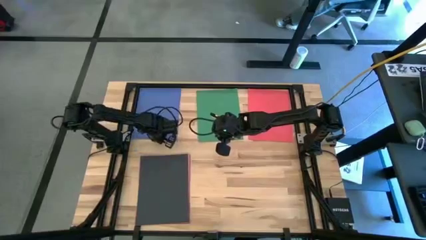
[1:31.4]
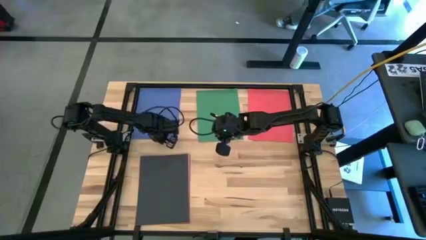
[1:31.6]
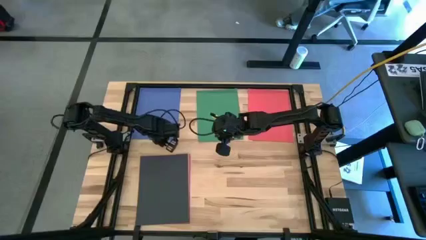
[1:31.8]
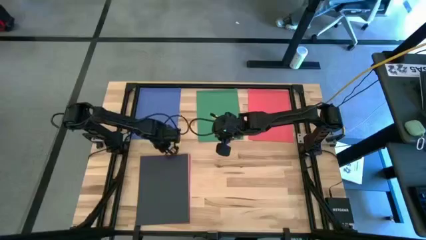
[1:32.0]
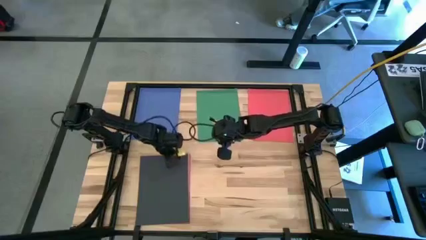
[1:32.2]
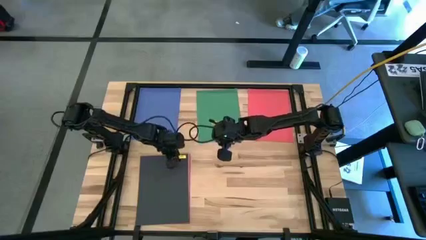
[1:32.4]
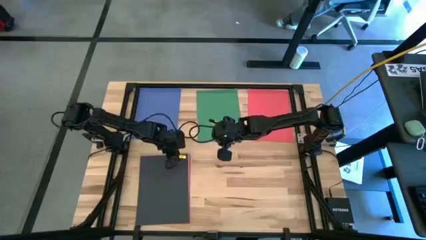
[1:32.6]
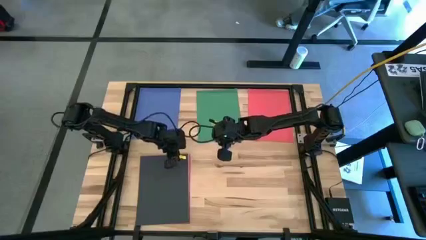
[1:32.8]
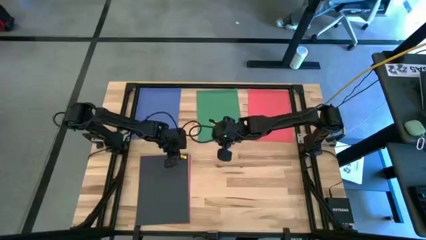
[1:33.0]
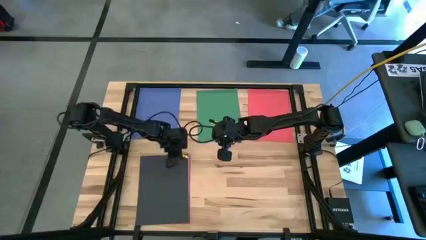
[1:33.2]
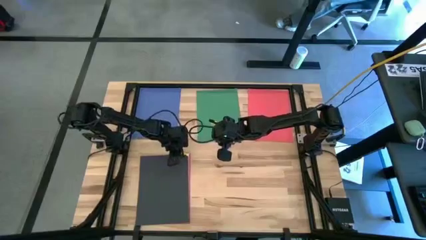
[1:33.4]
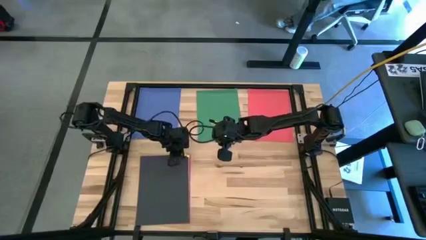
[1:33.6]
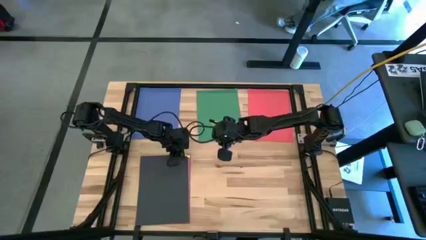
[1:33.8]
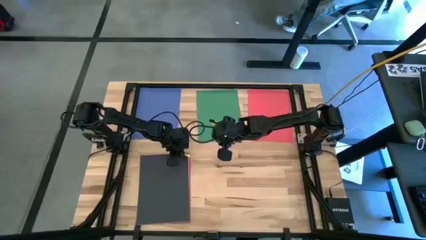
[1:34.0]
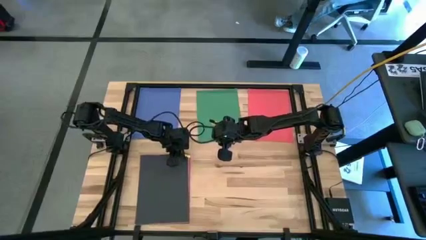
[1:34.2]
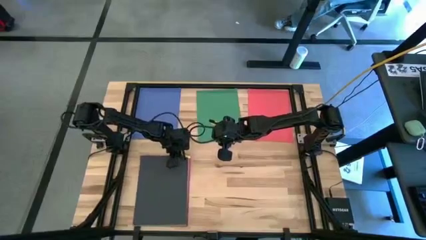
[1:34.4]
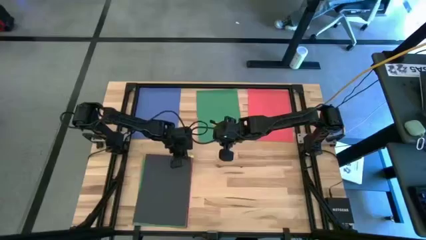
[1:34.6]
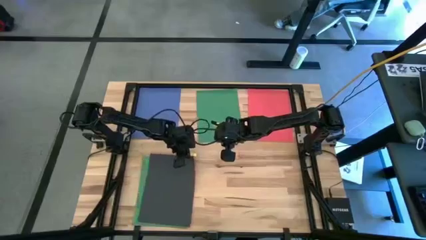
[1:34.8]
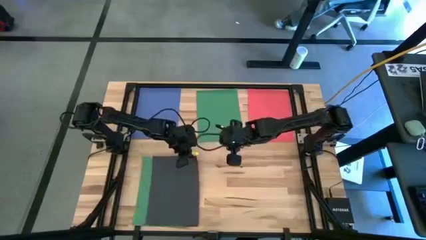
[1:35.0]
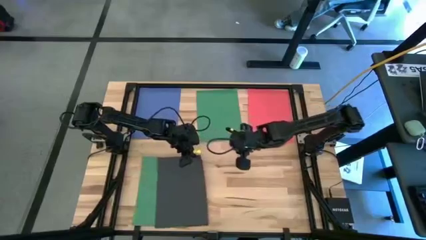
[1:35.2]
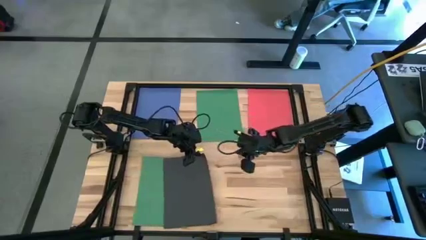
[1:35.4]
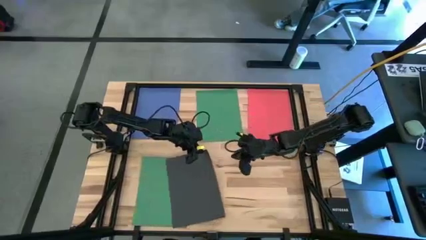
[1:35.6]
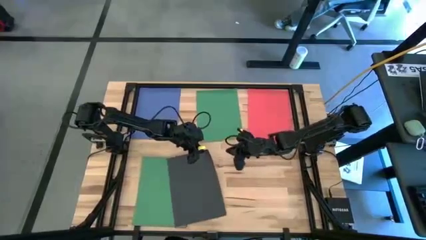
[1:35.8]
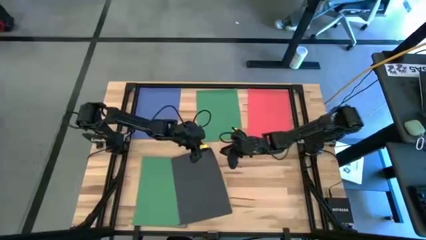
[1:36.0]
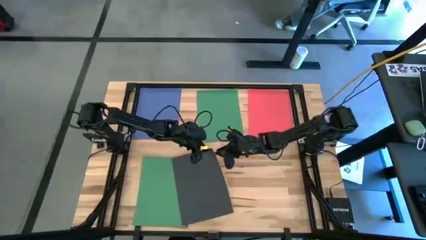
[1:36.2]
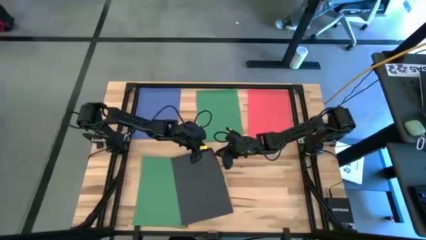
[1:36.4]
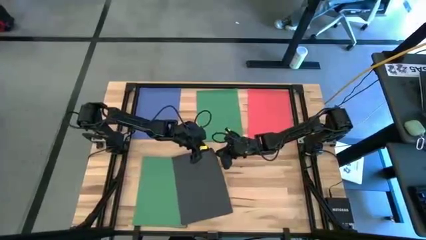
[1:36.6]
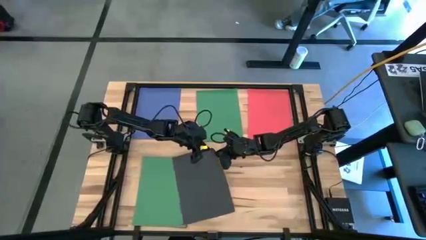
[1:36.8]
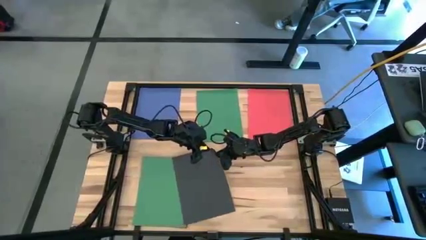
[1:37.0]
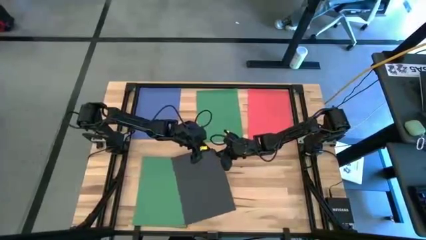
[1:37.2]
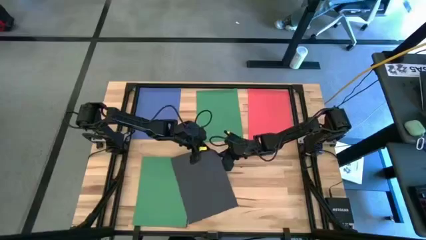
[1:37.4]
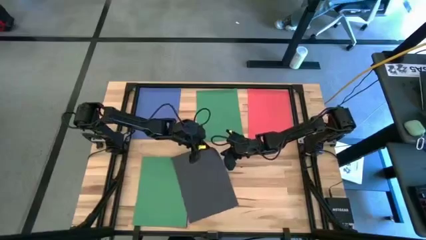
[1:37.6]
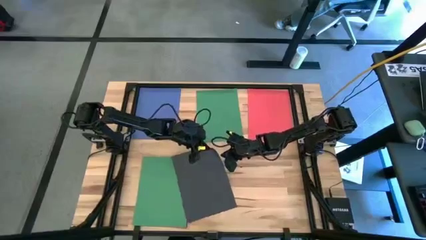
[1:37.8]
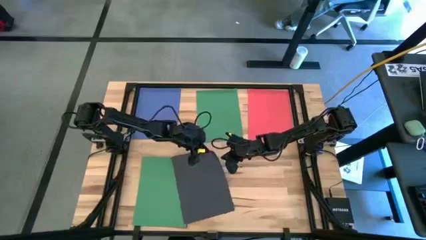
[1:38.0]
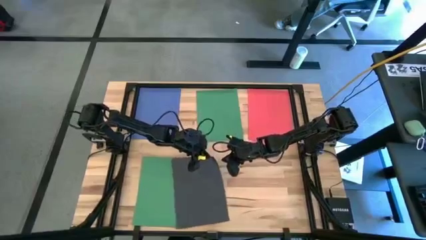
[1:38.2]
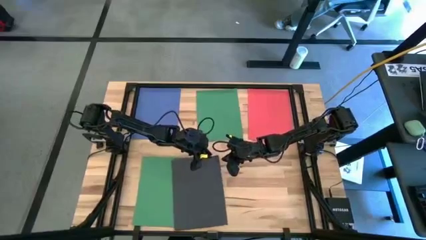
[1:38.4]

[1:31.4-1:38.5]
Task: Organize paper
Move the black paper to the bottom right of the table

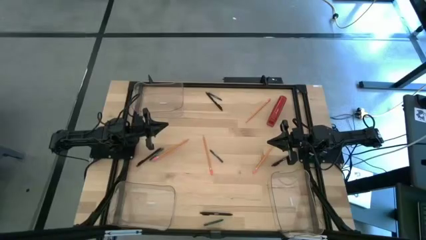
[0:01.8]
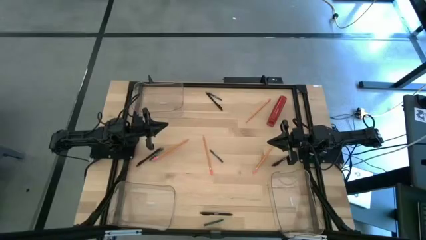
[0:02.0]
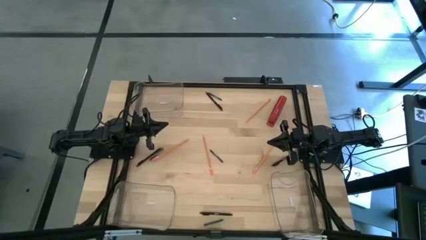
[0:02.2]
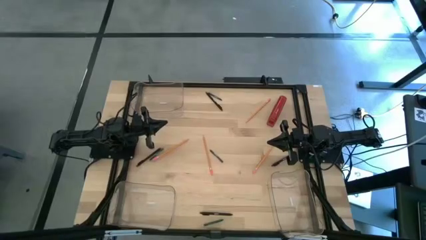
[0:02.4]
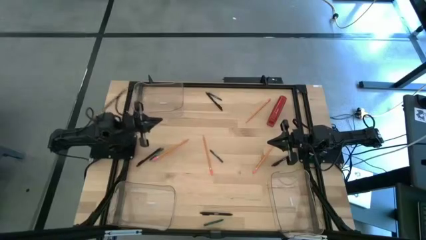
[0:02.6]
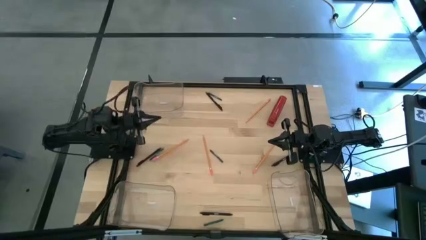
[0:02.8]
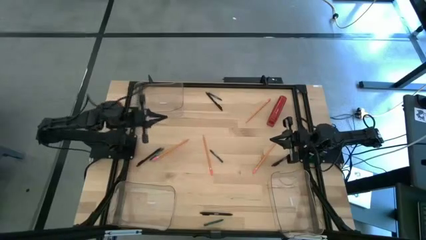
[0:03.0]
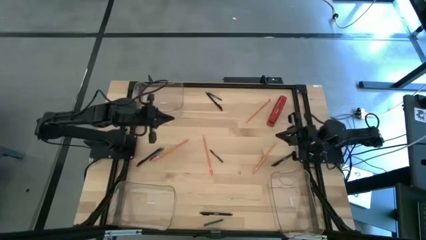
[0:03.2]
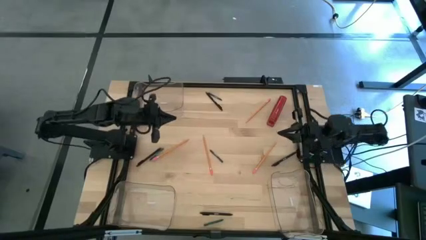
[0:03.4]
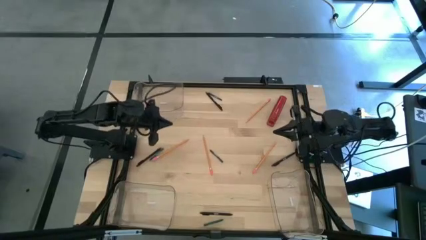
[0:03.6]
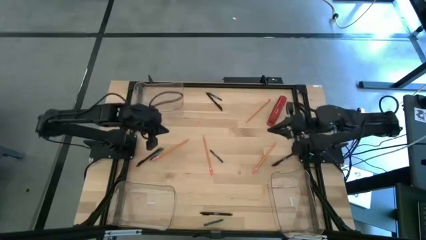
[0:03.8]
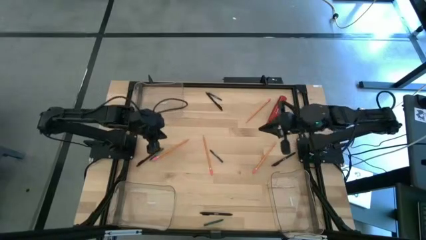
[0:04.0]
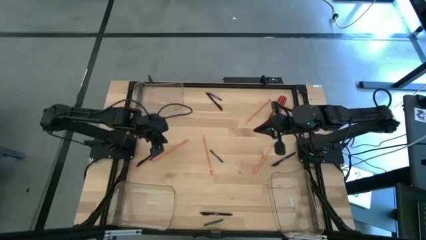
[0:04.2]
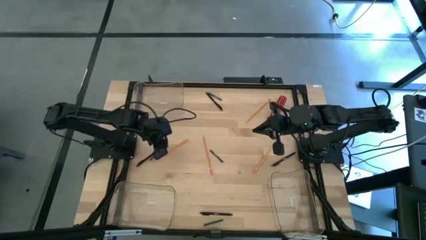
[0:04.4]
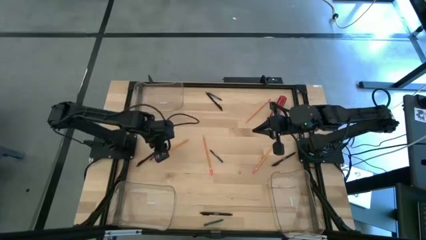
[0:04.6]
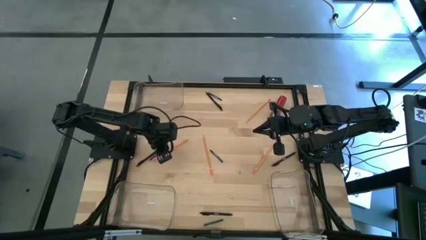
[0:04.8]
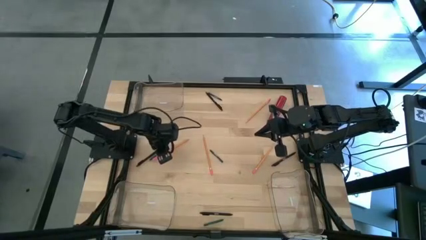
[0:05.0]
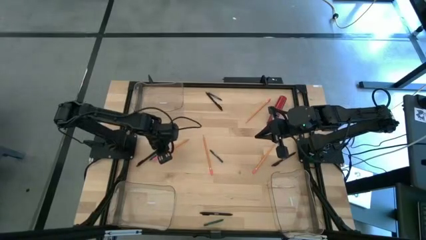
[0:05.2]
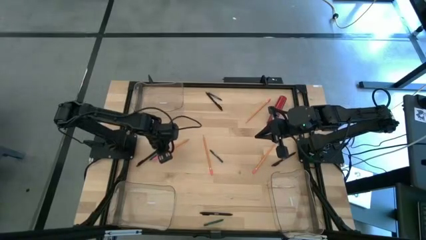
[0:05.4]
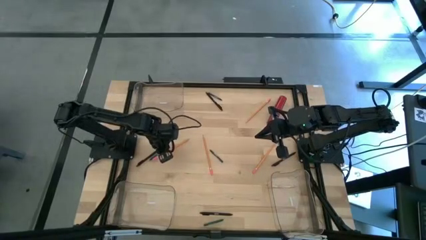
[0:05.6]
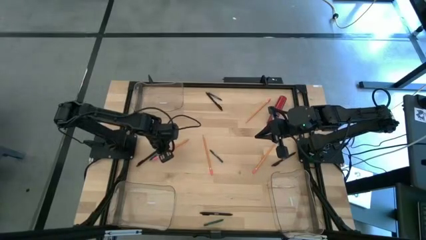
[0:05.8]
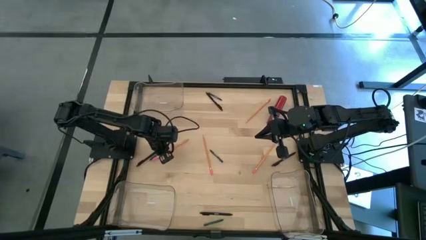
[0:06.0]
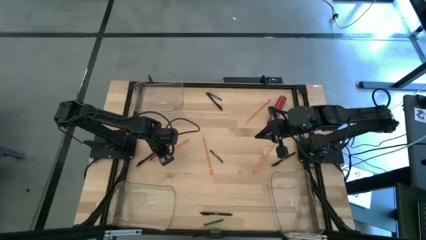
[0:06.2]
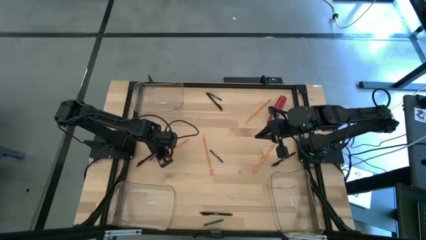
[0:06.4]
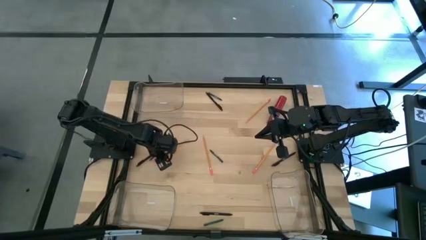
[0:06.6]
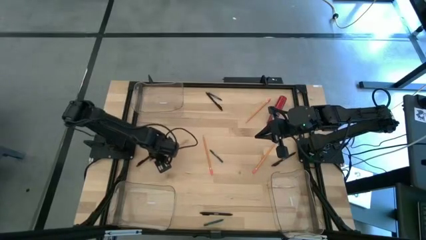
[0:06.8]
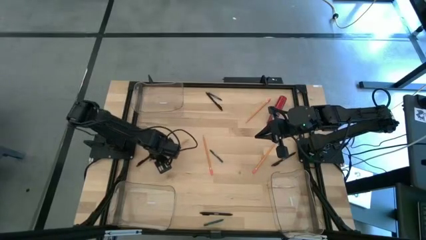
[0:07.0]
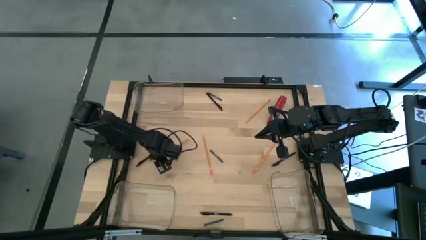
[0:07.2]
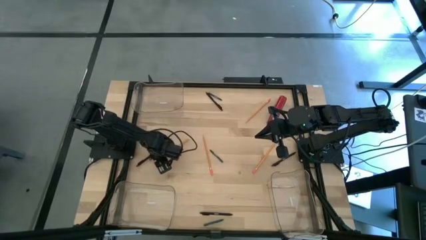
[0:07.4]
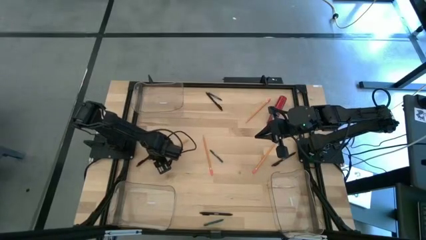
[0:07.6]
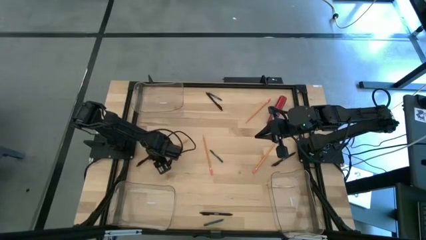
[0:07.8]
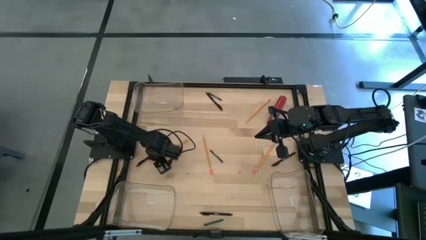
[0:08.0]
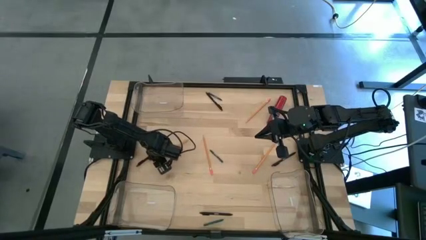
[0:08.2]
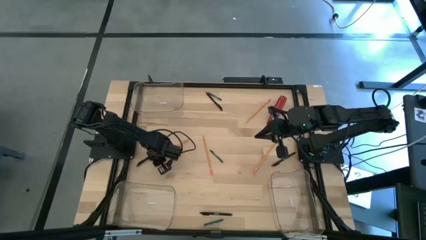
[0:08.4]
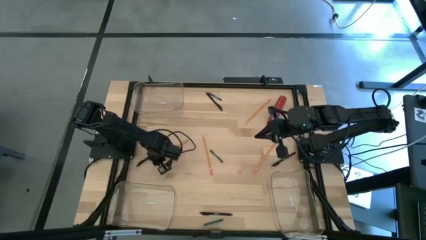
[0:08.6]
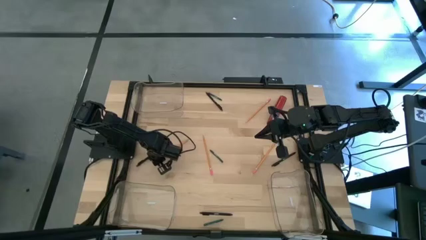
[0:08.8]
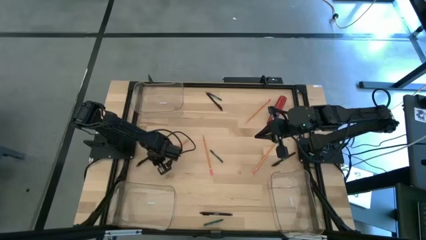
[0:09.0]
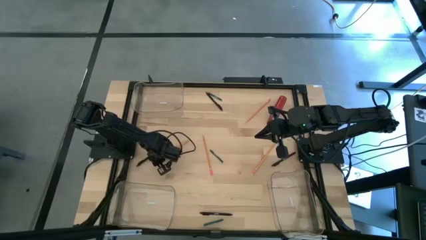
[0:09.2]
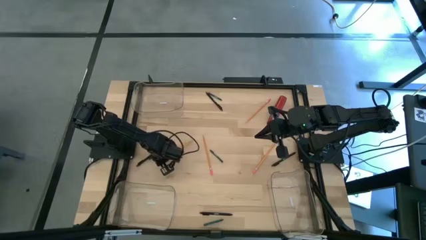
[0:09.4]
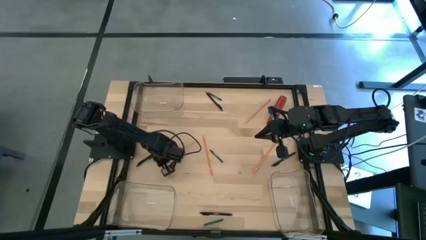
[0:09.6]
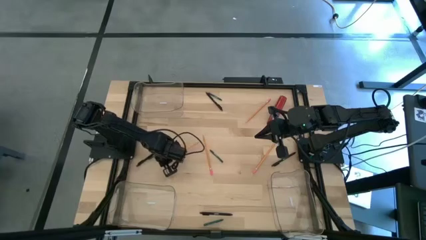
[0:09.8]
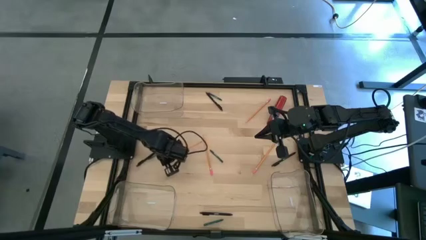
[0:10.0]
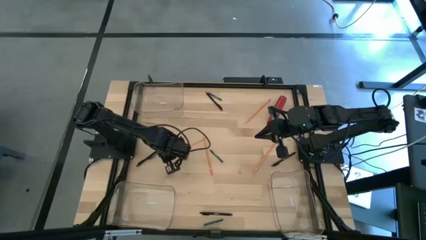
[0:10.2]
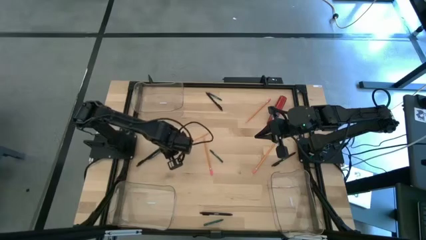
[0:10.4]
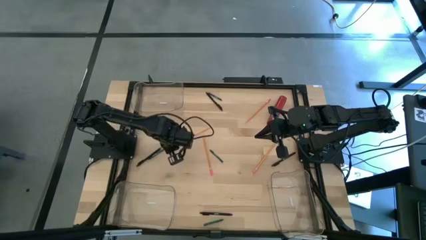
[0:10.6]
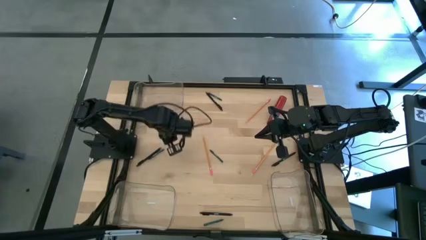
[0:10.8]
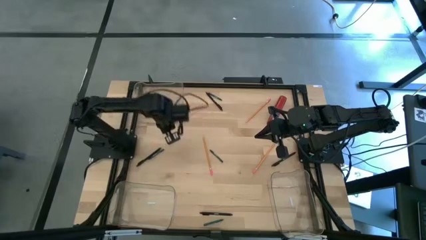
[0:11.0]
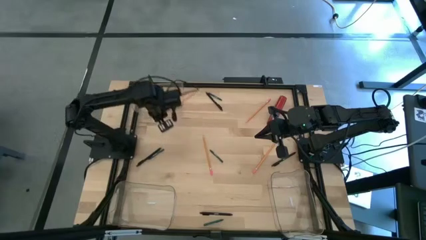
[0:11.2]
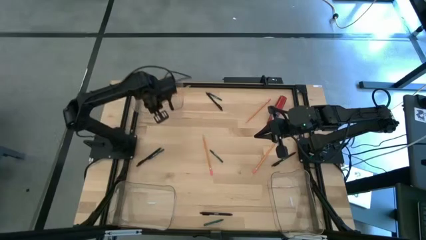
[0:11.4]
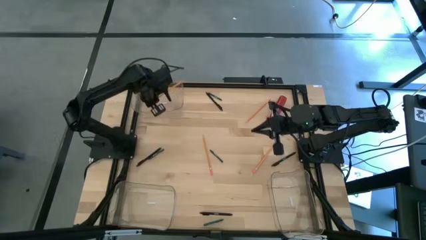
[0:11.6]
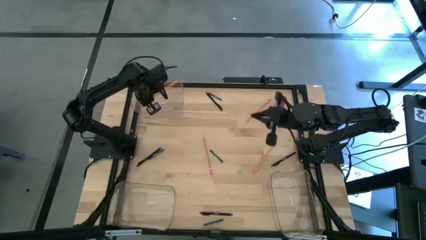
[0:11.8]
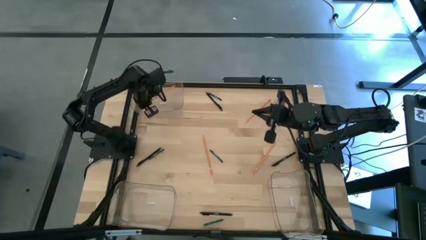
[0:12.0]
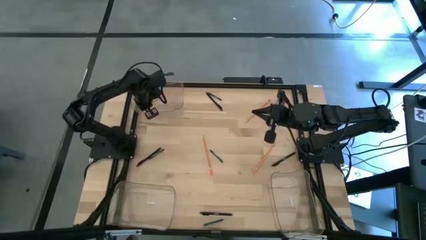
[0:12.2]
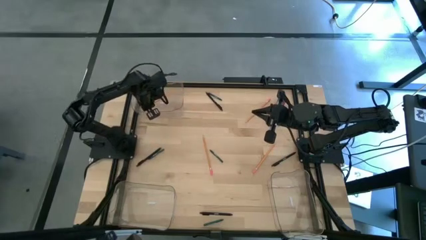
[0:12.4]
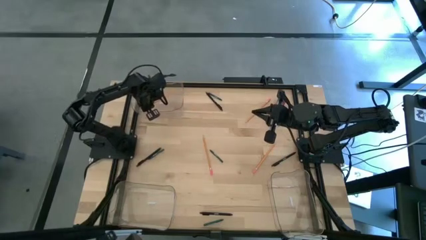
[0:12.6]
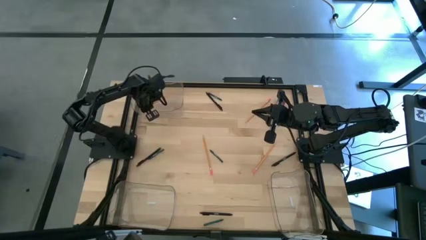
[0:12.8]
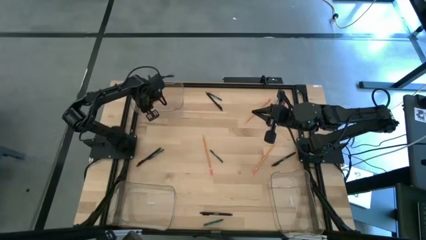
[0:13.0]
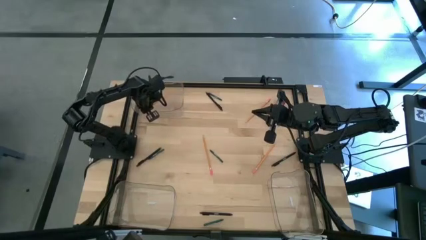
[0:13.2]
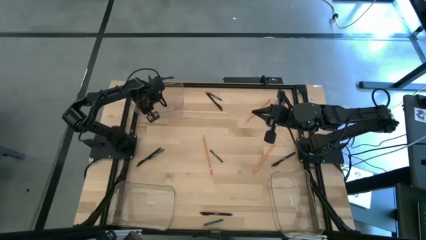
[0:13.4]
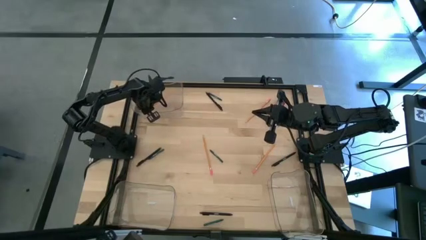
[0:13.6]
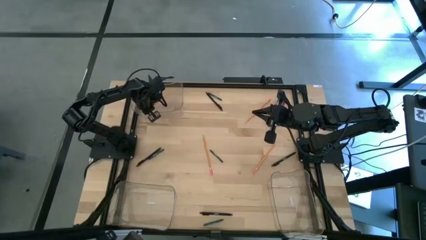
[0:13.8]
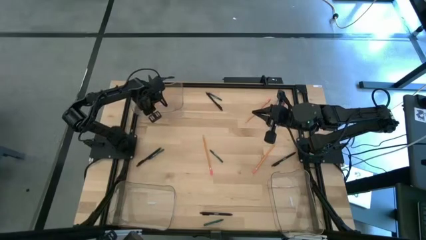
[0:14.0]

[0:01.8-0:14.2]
Task: Sort crayons/erasers/pens/pencils in bins
Put the orange pencil into the top transparent bin
